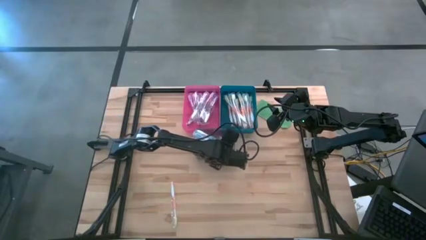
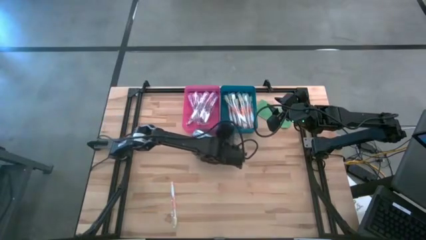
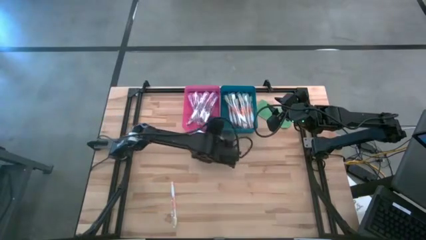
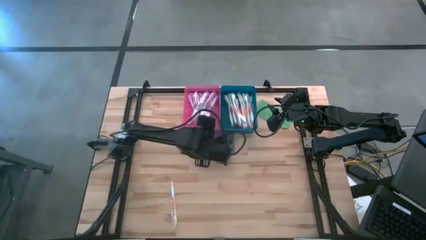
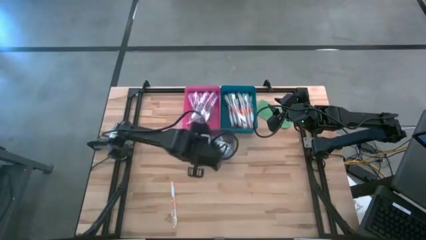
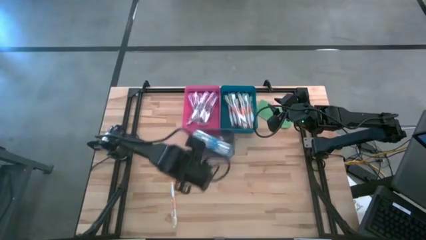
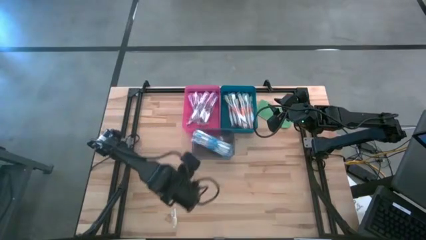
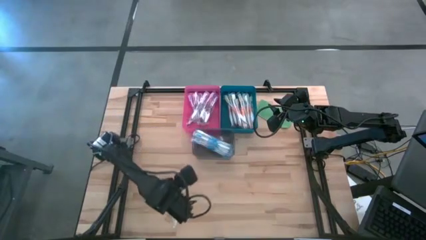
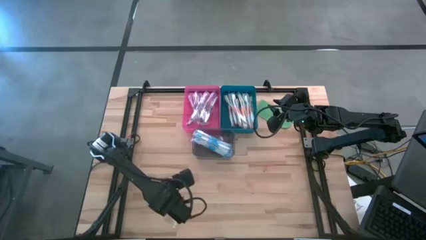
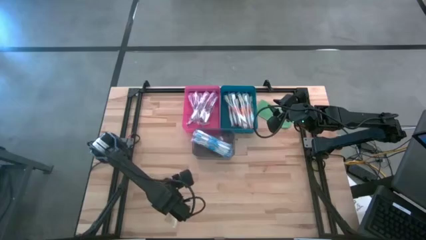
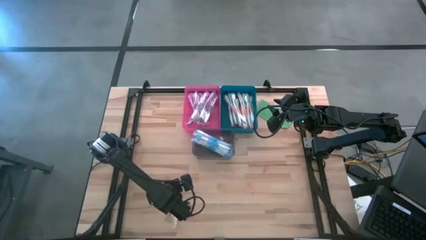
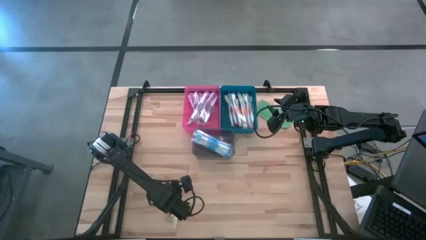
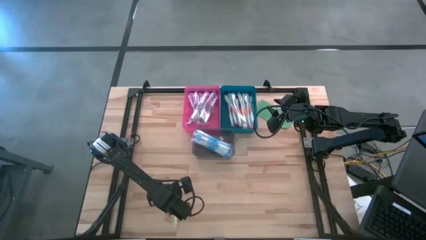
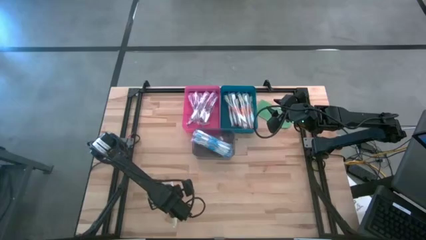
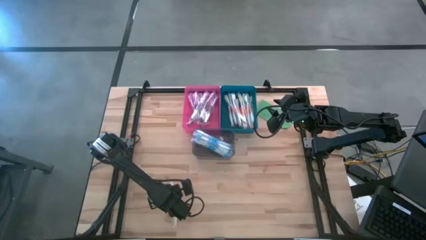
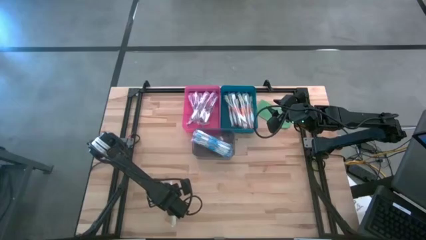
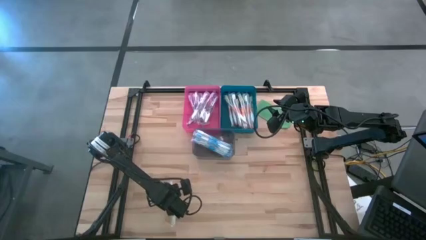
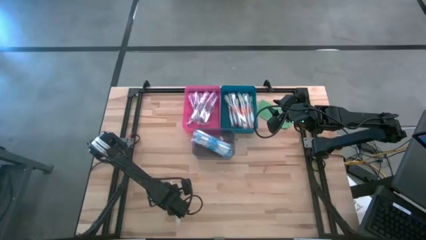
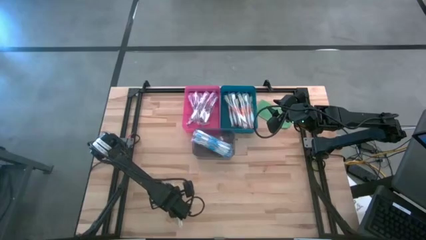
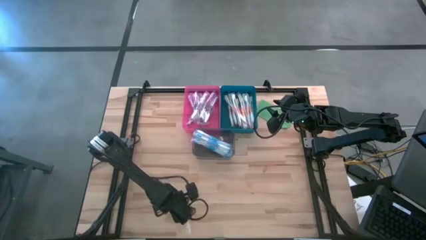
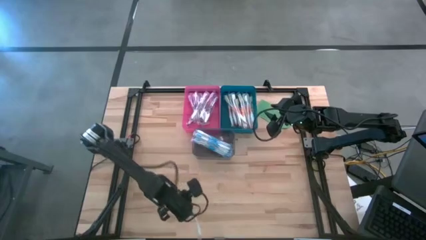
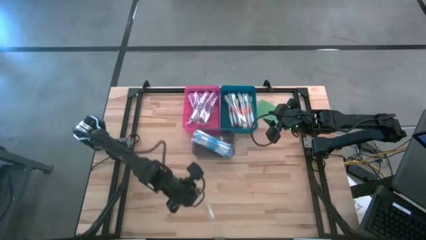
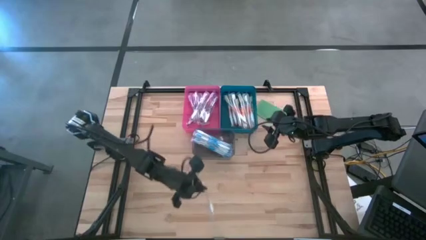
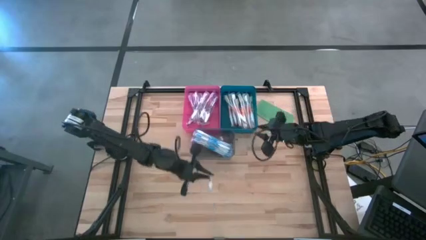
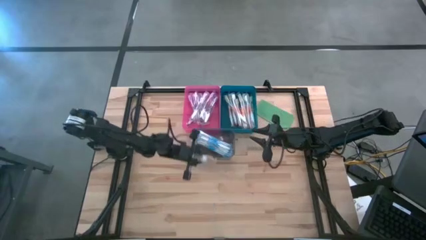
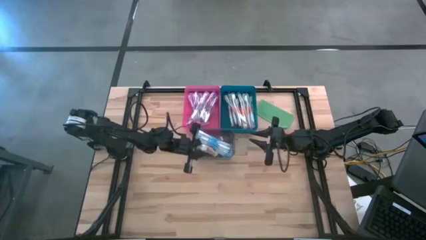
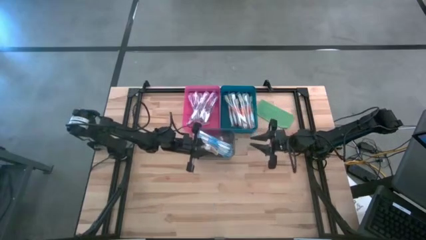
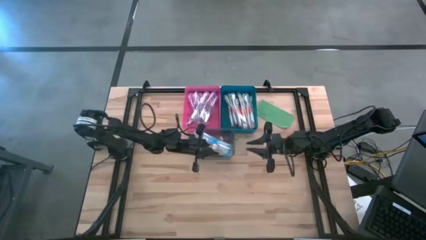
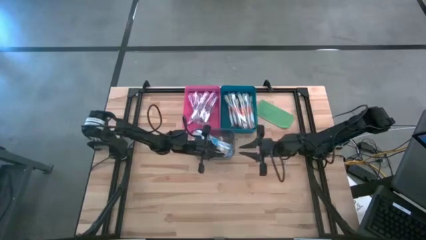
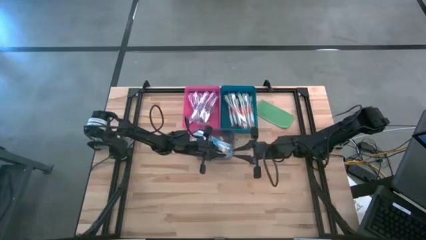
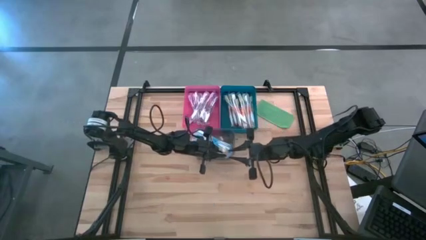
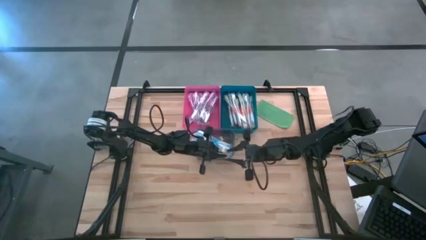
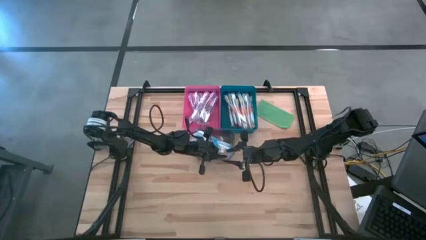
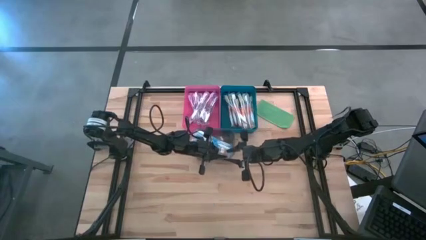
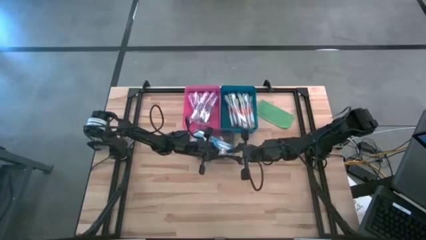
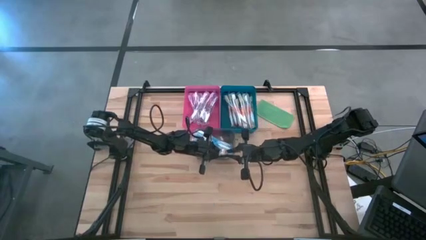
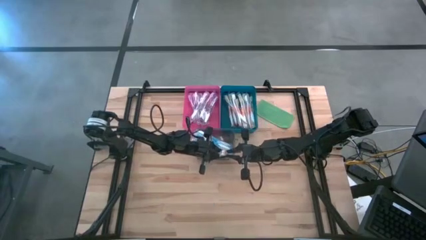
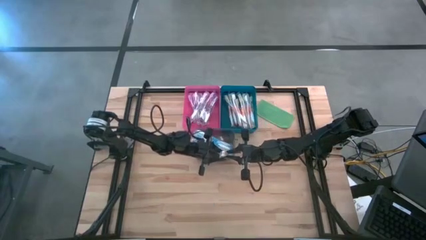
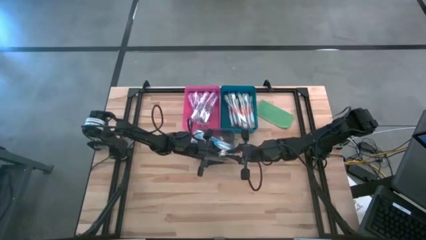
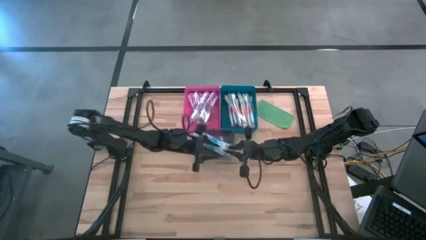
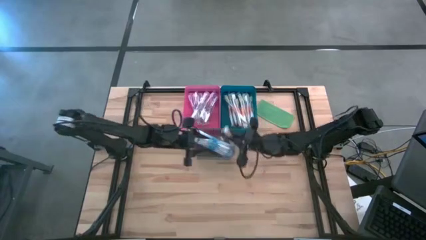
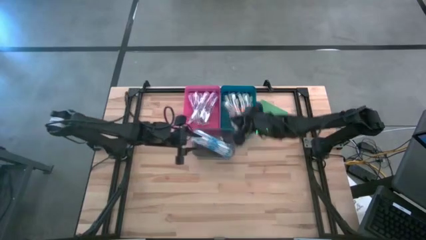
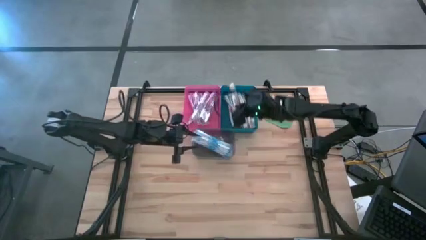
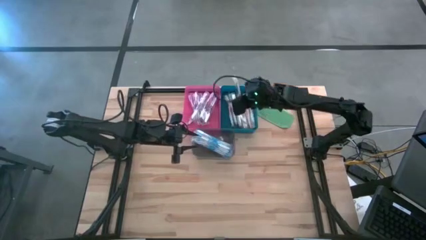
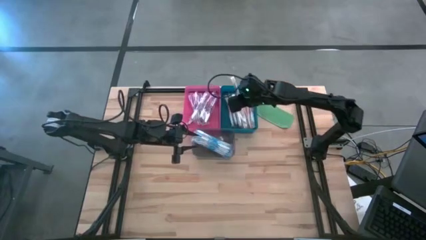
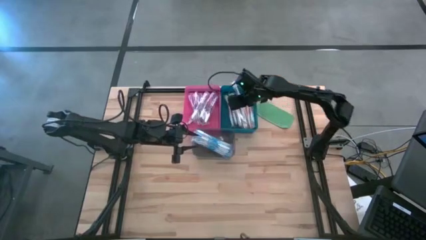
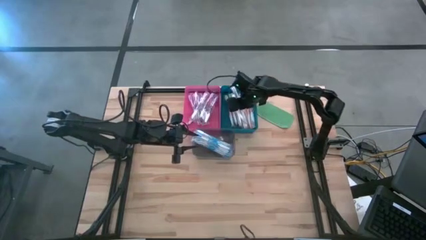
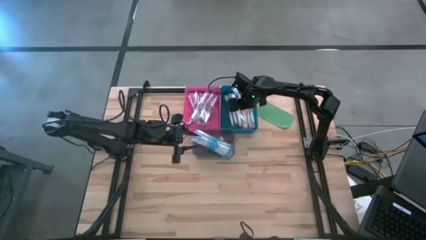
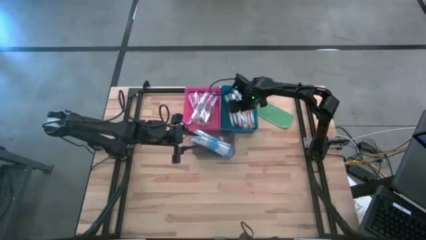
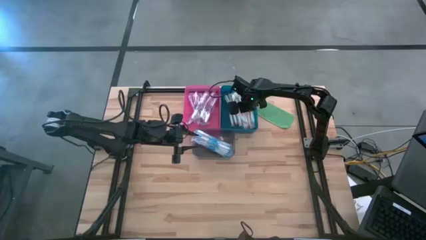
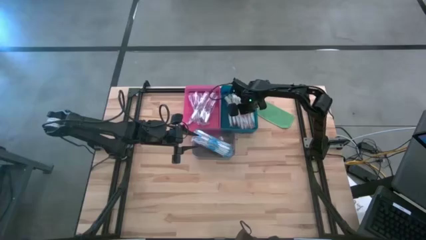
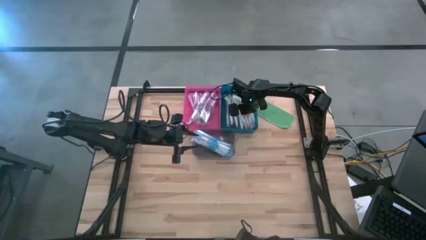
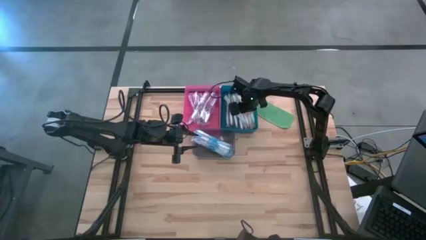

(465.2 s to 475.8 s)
Task: Pick & Place Toothbrushes
Put the orange toothbrush into the blue bin

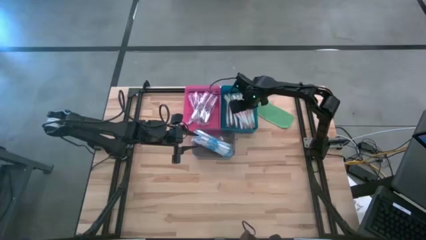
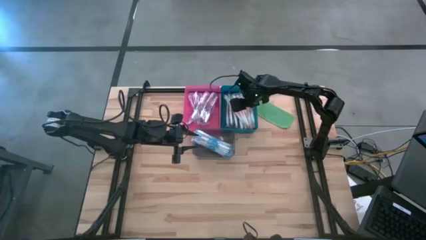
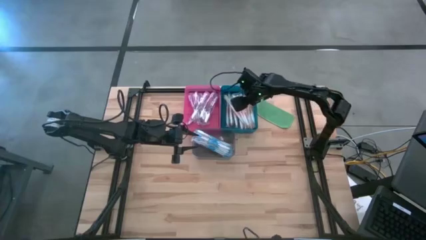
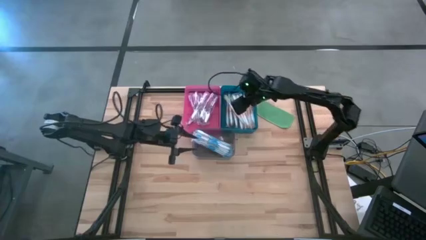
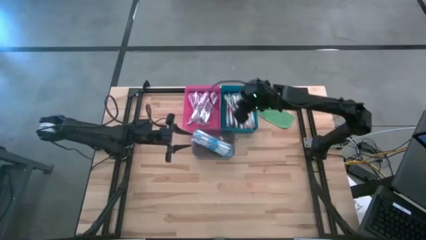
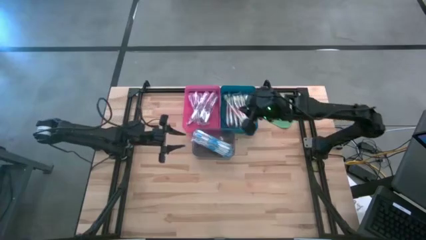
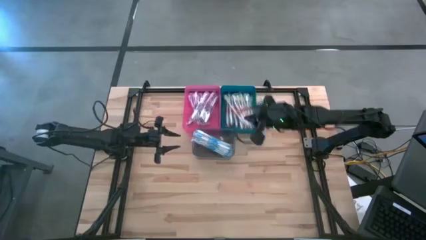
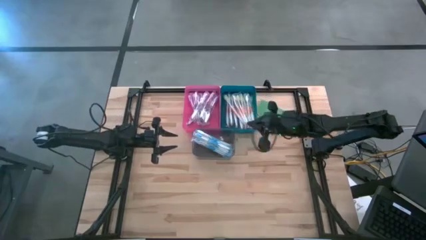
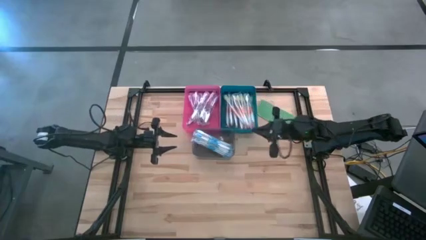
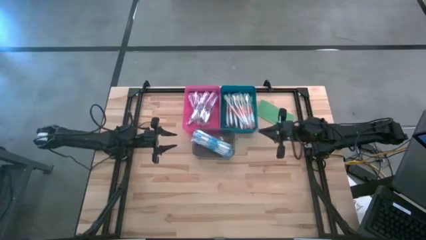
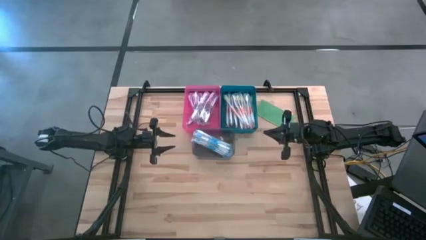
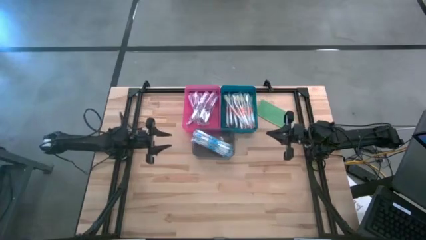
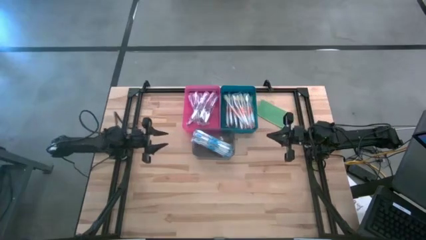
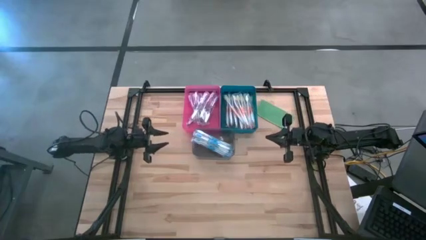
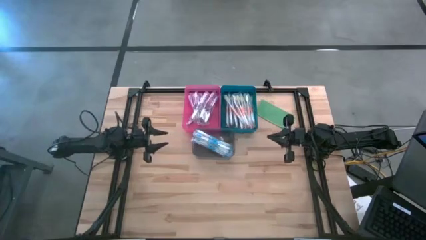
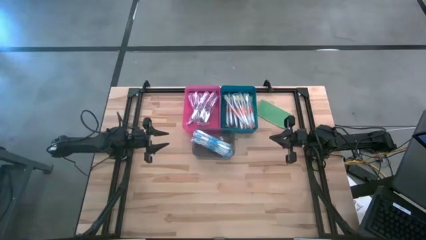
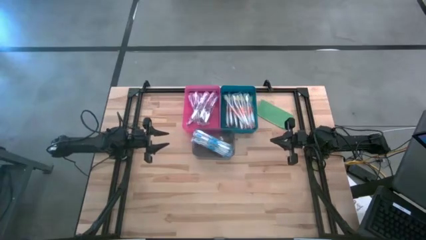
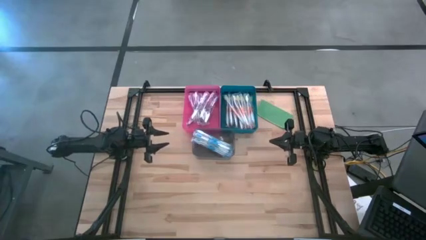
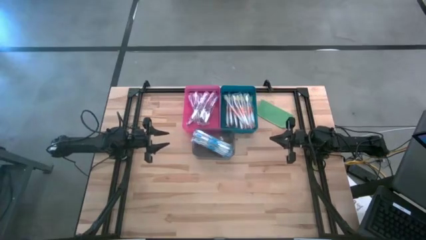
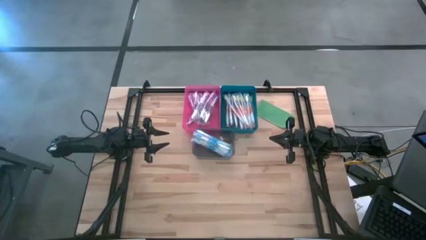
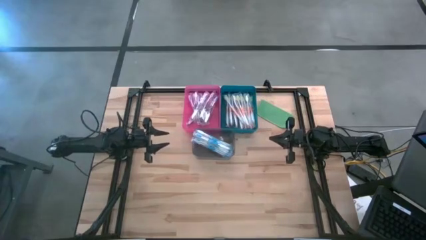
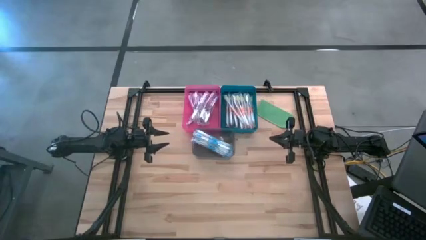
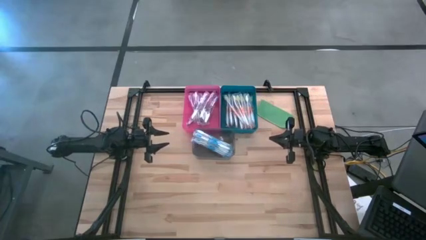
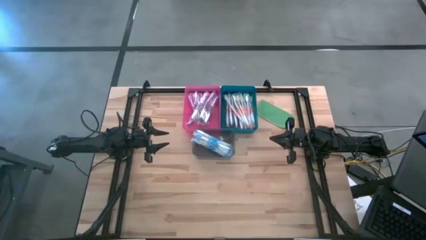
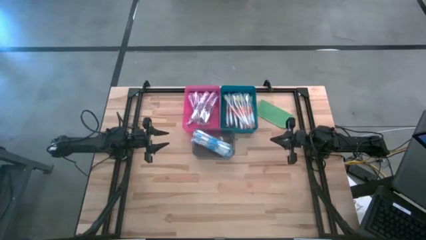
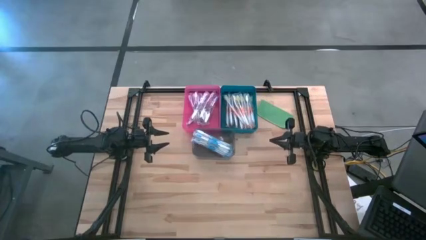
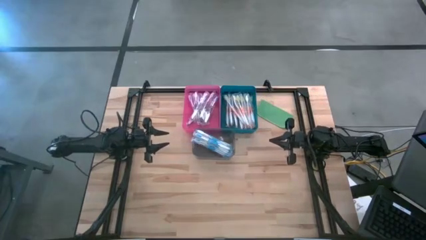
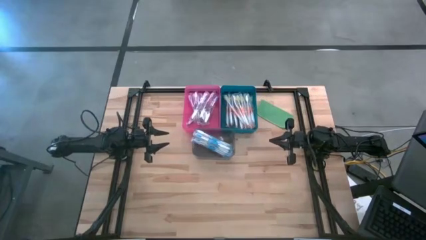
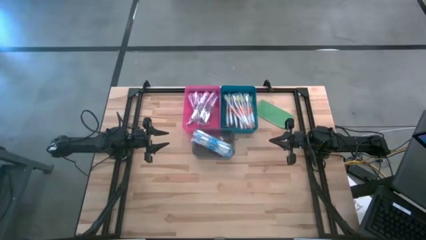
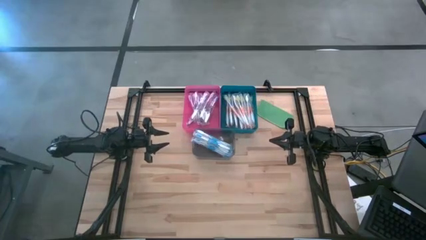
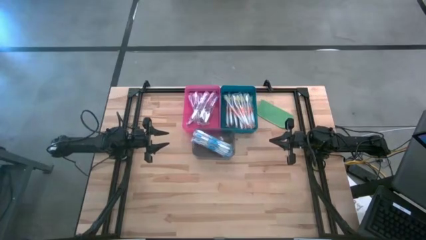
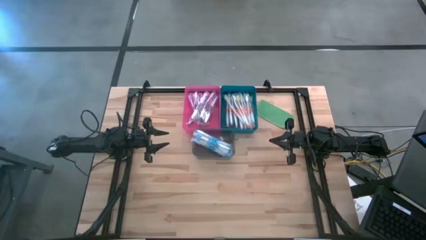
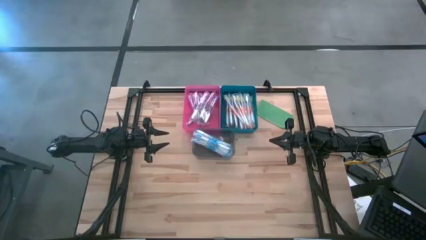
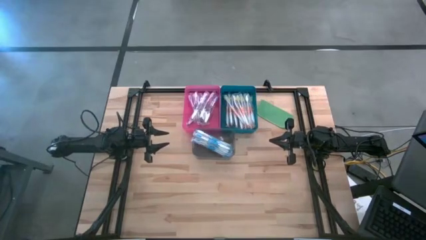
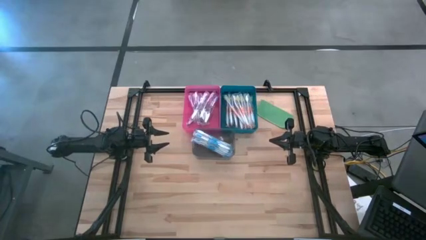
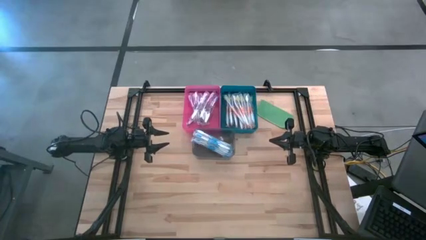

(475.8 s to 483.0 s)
Return to home position
